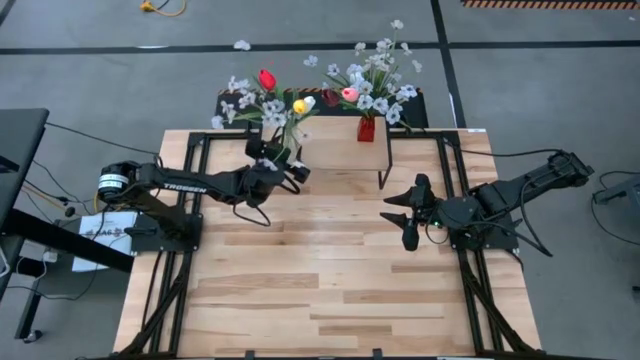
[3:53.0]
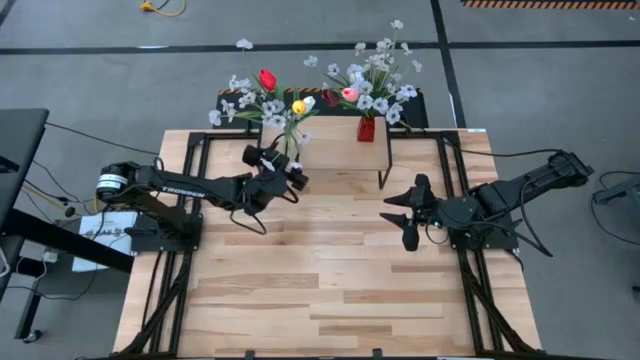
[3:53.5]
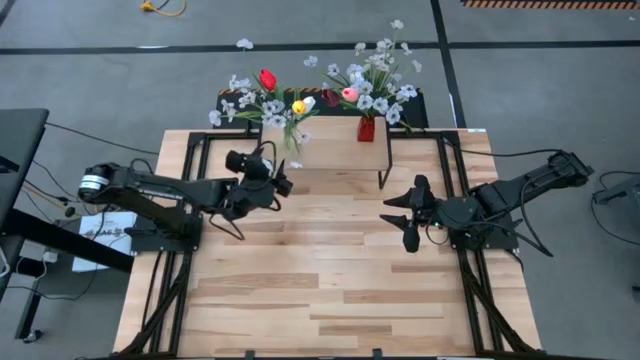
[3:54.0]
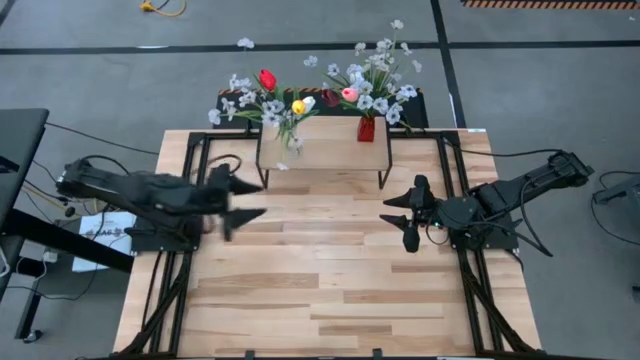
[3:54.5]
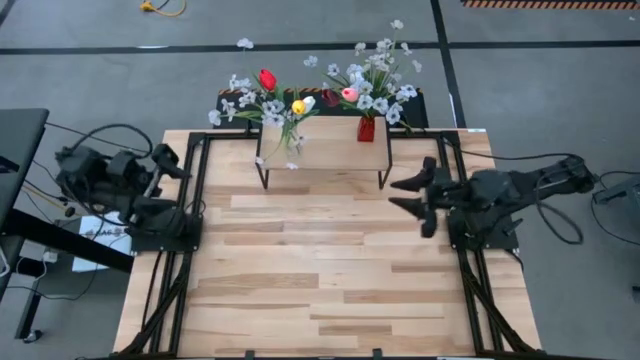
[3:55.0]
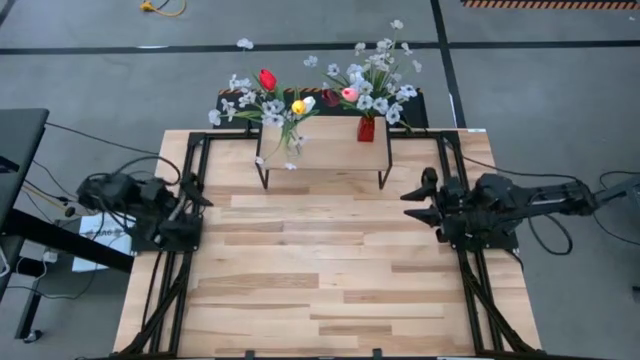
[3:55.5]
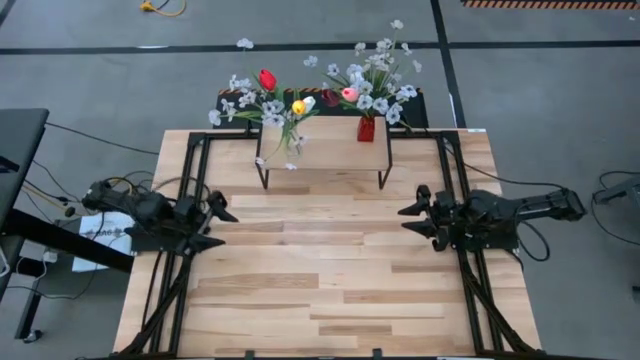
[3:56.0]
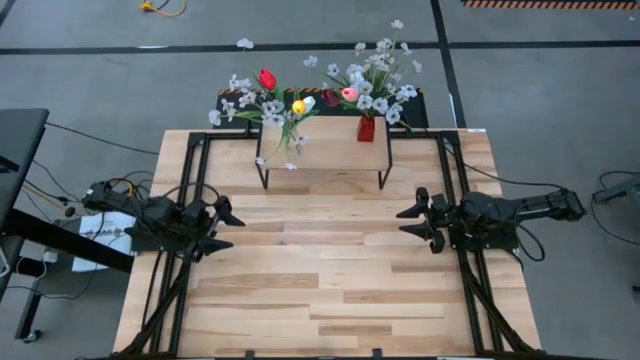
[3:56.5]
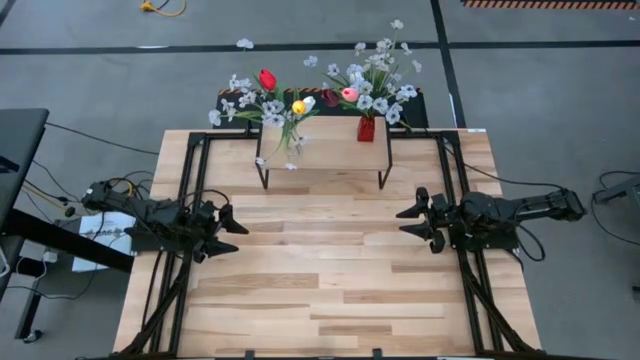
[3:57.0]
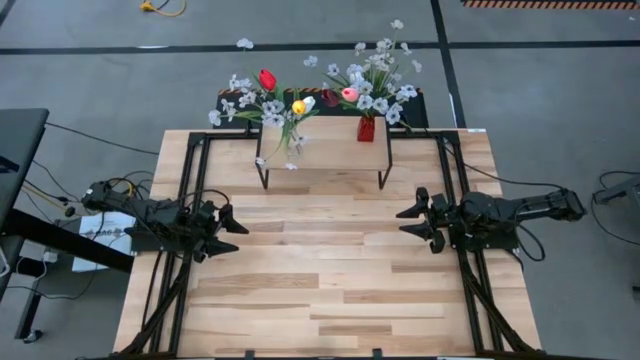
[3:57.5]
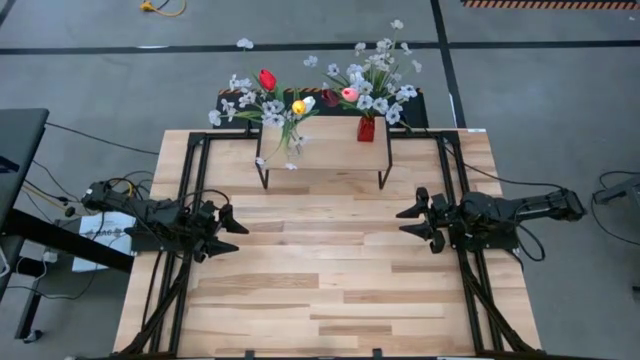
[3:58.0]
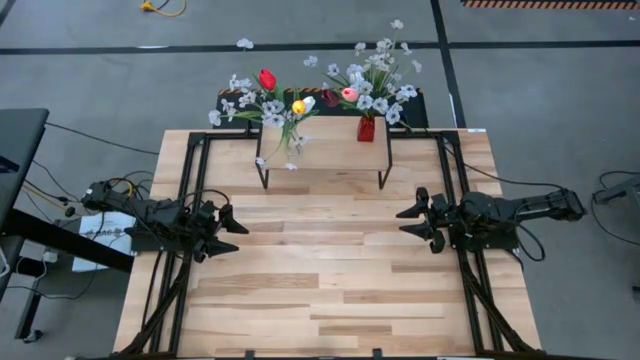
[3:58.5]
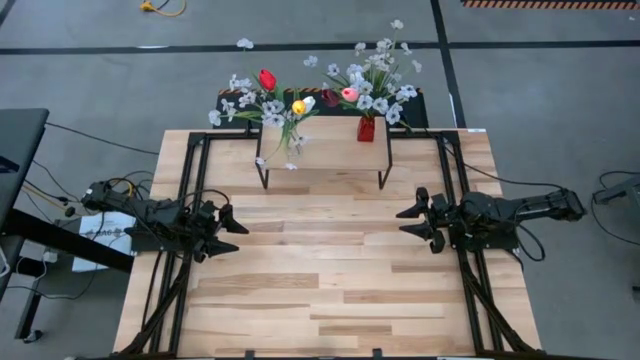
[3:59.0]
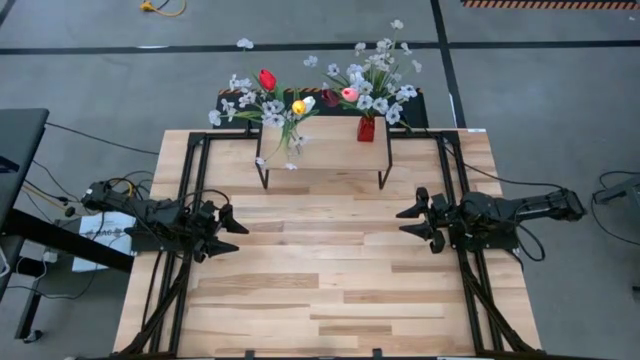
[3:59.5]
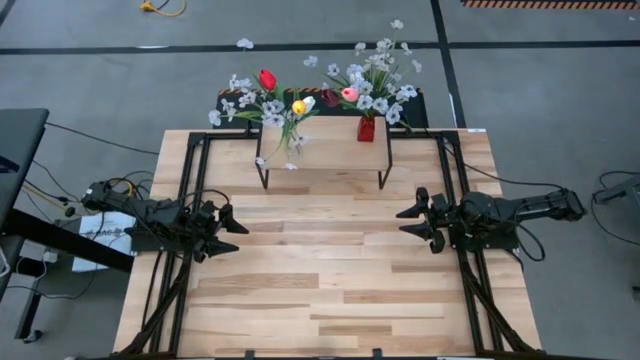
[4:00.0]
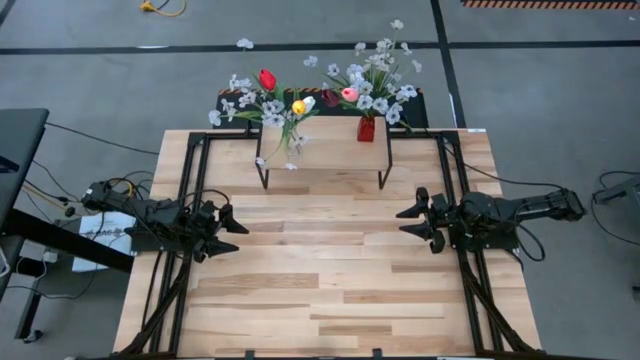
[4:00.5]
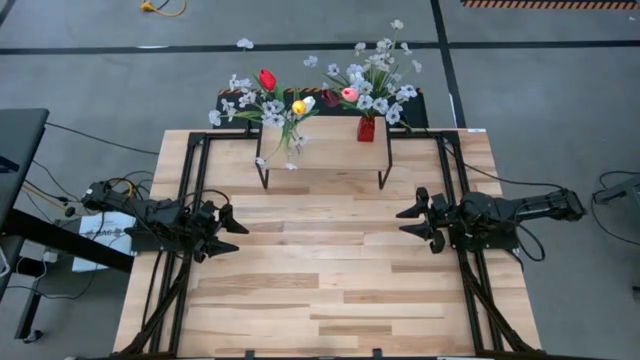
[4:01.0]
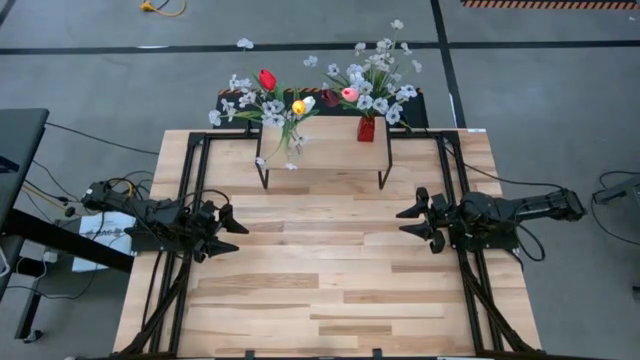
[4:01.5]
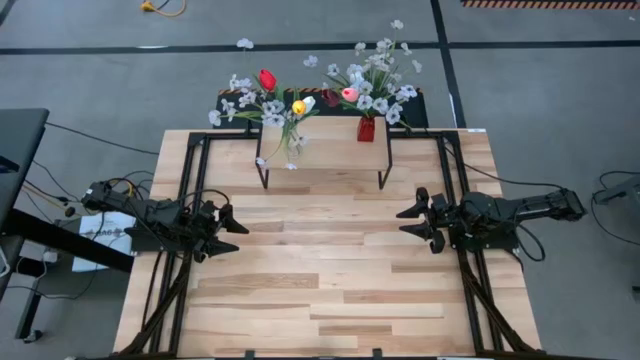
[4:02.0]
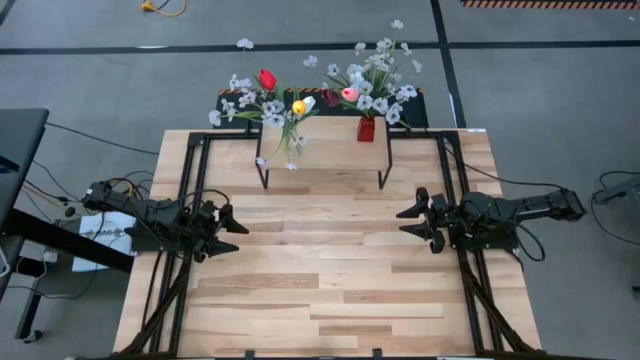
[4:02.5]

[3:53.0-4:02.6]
Task: Pick and place flowers into a vace then onto a shelf
Return to Home Position

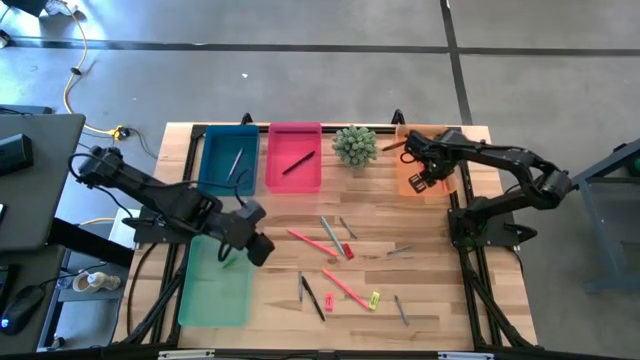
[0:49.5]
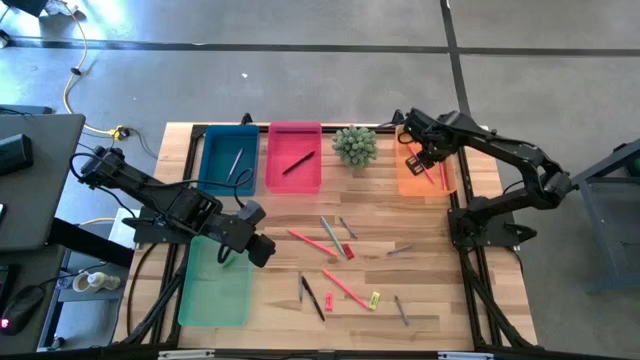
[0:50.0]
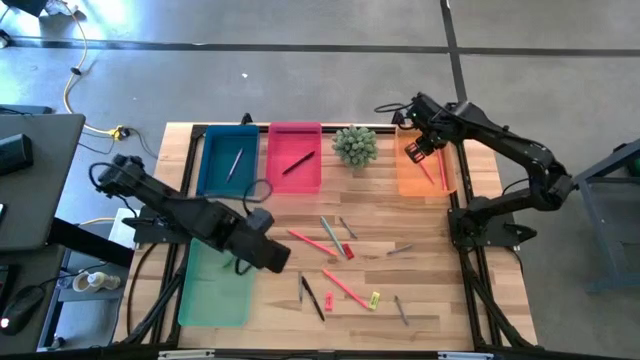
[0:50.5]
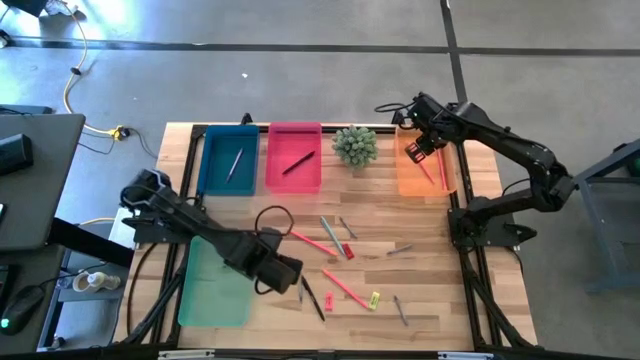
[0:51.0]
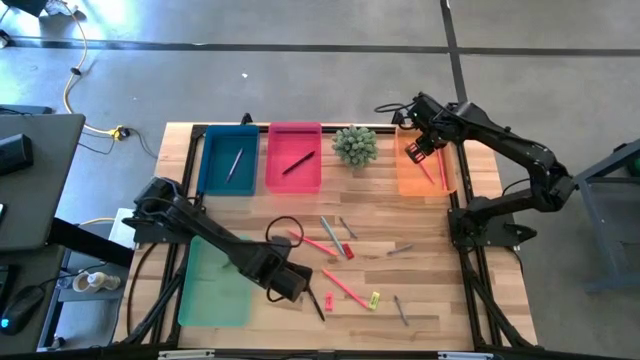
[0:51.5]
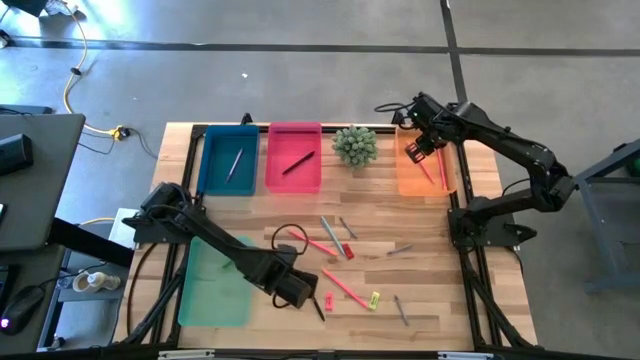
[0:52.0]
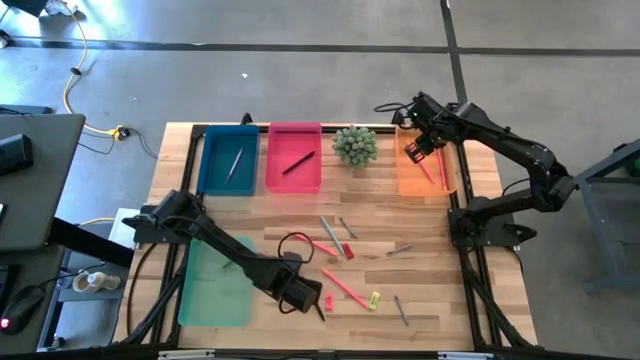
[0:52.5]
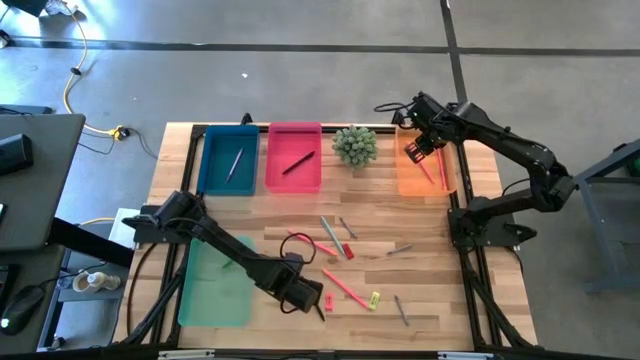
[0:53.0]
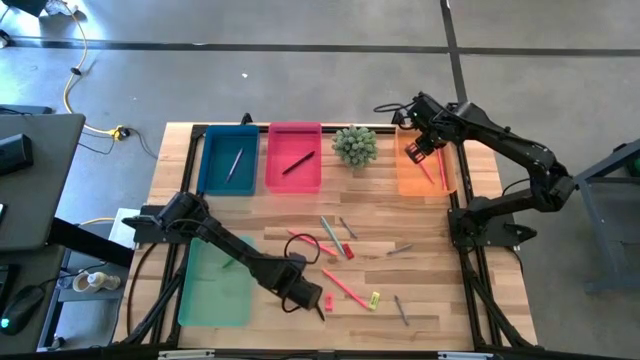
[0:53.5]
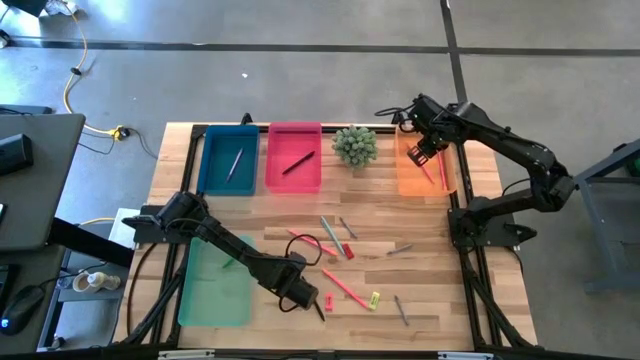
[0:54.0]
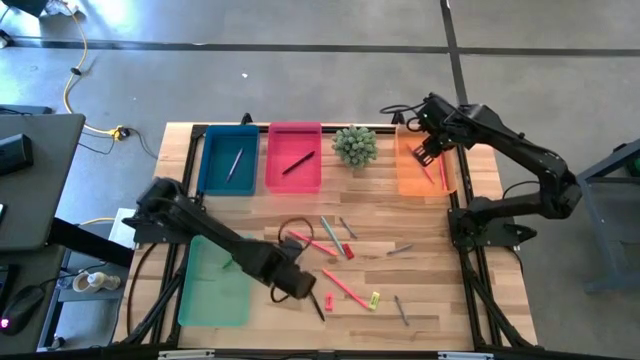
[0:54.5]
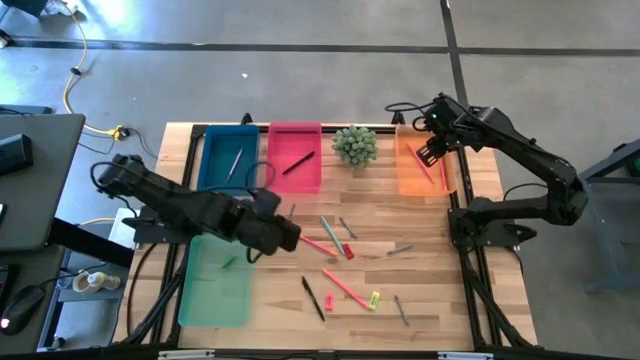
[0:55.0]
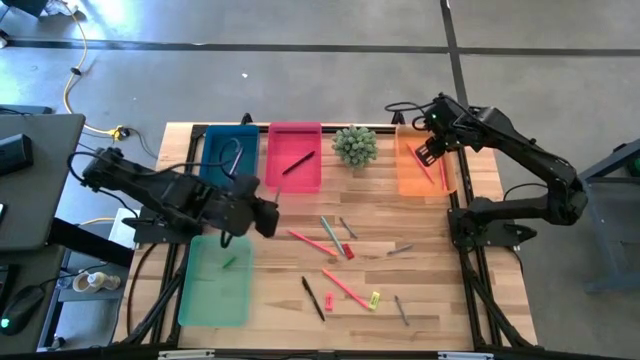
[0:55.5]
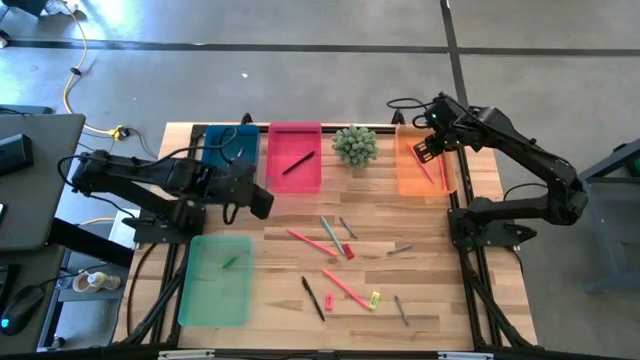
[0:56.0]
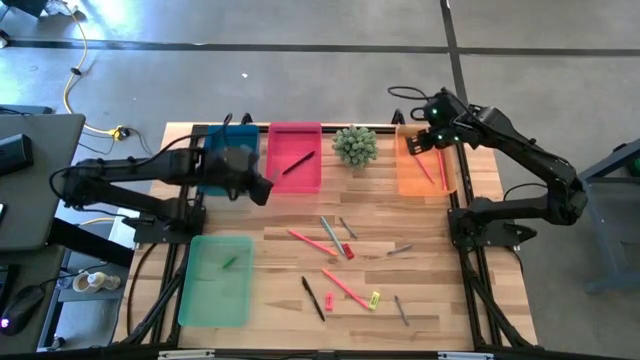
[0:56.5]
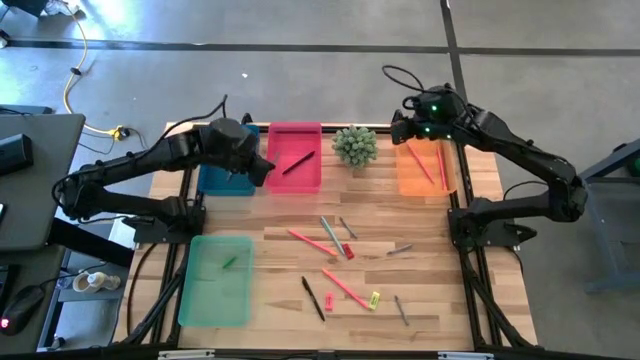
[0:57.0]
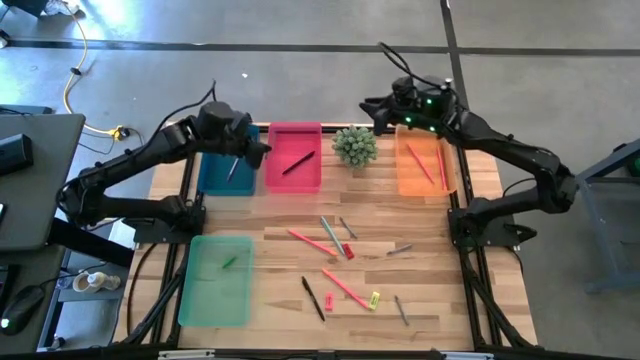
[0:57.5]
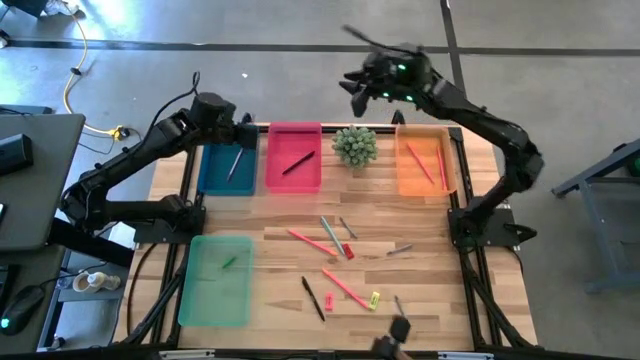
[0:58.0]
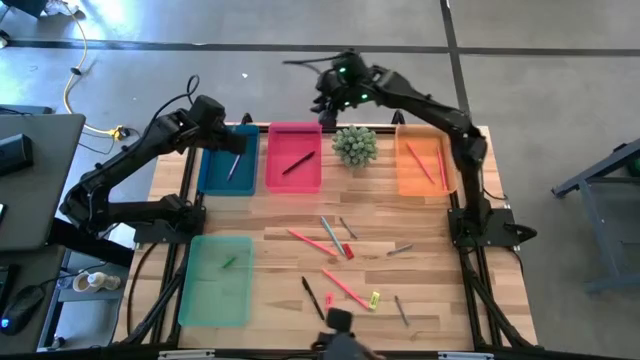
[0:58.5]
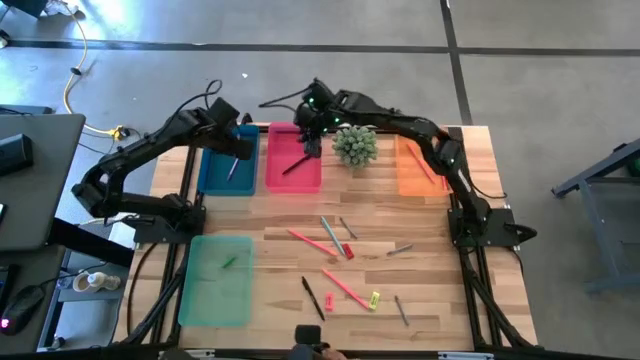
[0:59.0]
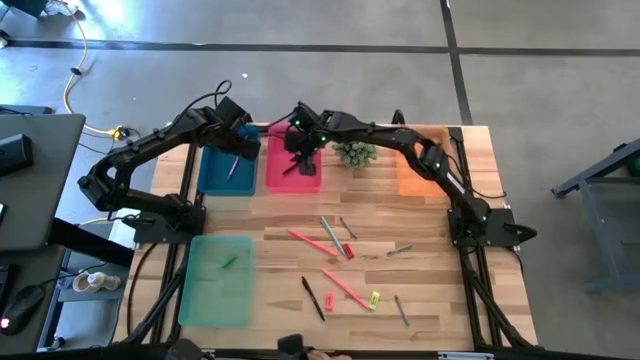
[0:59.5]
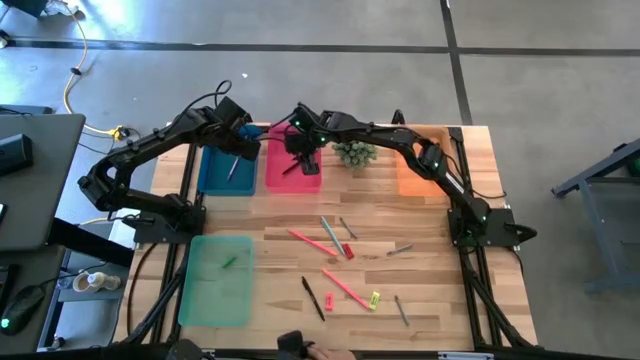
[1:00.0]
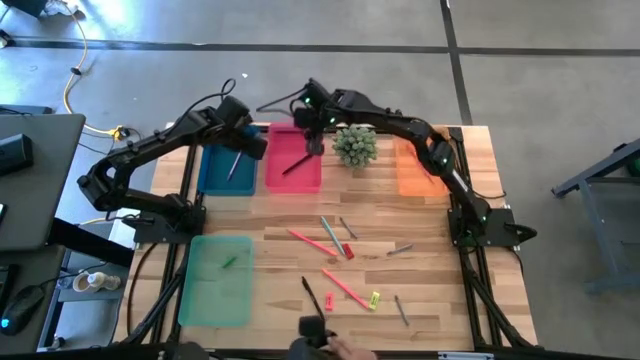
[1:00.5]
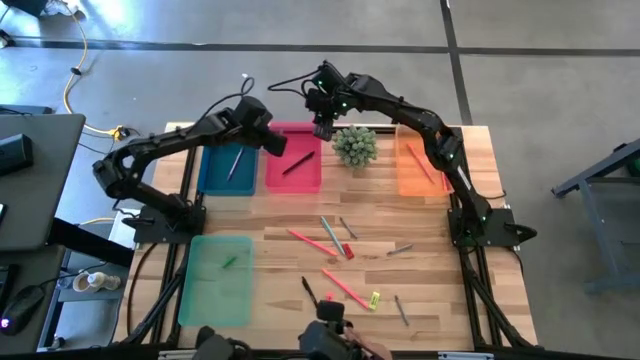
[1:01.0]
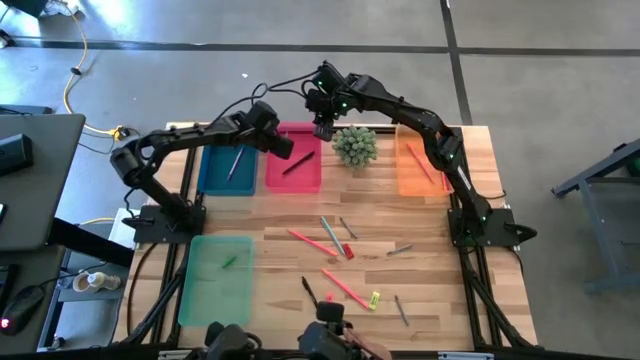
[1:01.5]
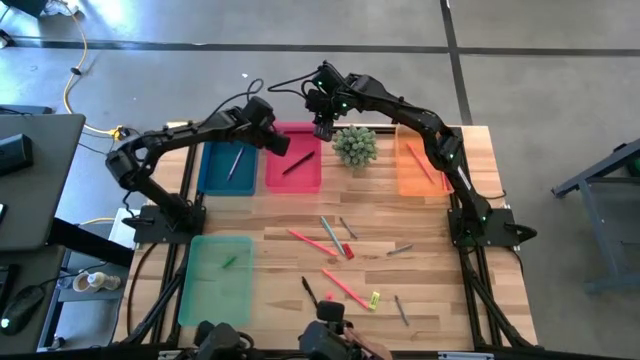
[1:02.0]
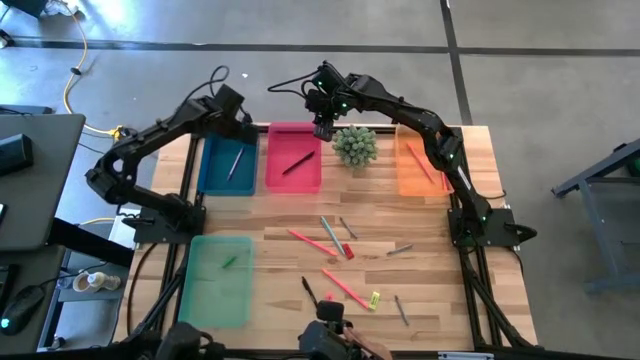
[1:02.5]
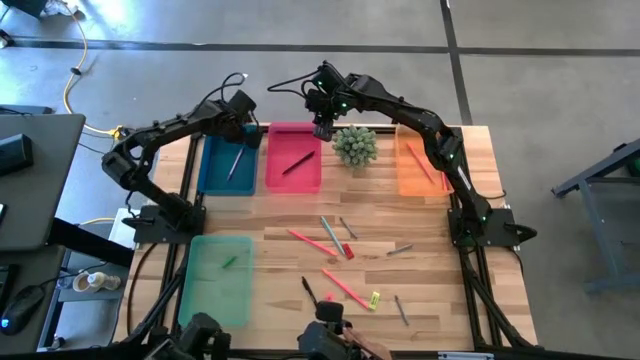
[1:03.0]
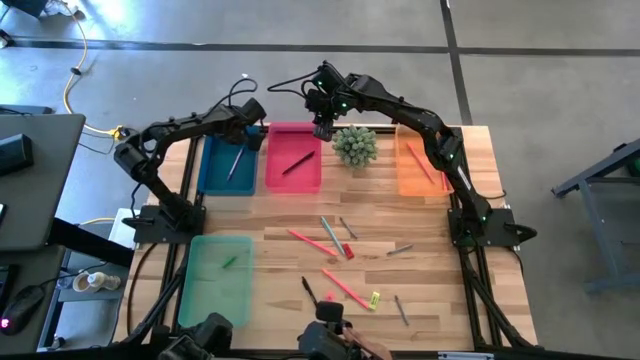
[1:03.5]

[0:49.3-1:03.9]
Task: Sort crayons/erasers/pens/pencils in bins
Put the gray crayon into the blue bin
